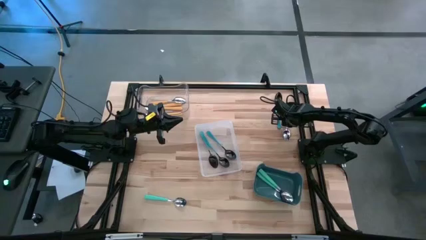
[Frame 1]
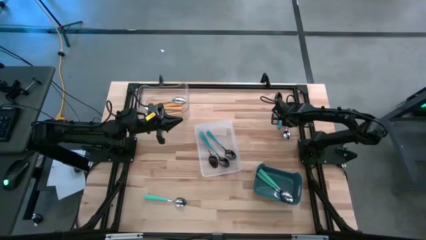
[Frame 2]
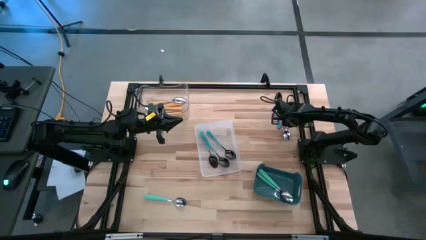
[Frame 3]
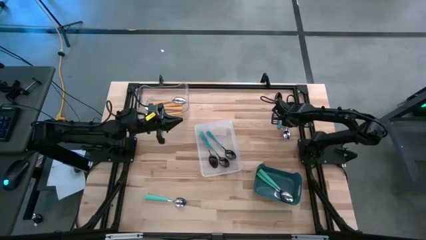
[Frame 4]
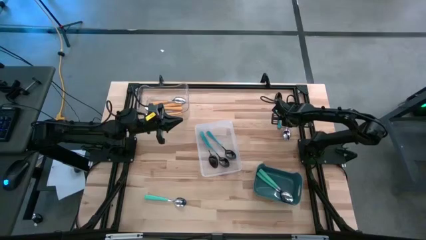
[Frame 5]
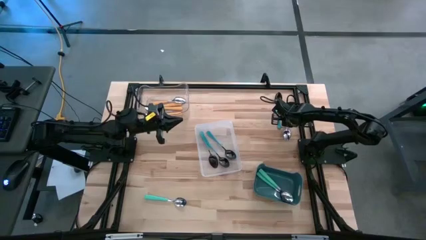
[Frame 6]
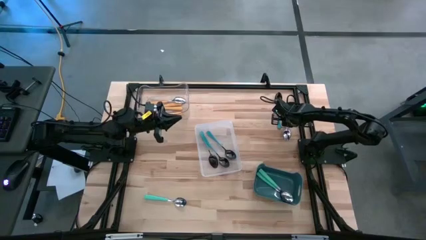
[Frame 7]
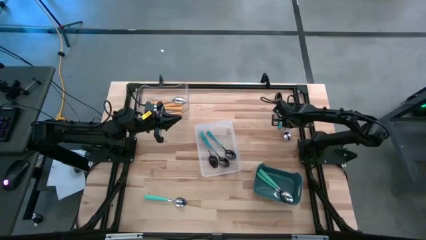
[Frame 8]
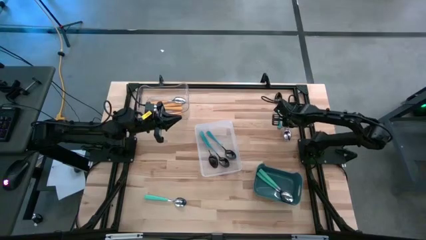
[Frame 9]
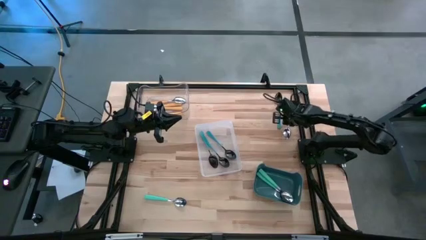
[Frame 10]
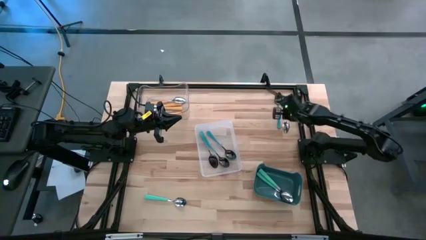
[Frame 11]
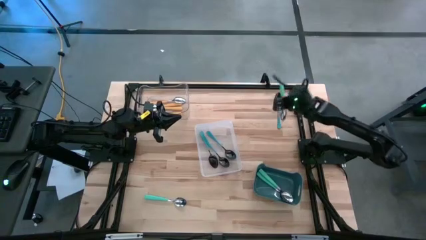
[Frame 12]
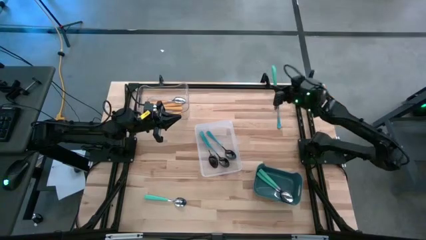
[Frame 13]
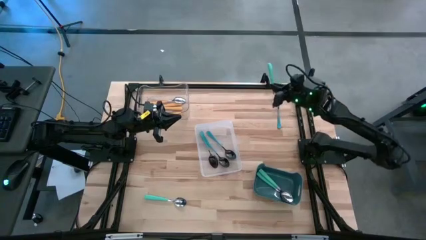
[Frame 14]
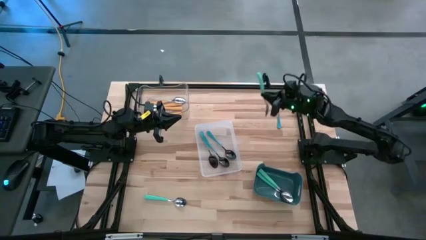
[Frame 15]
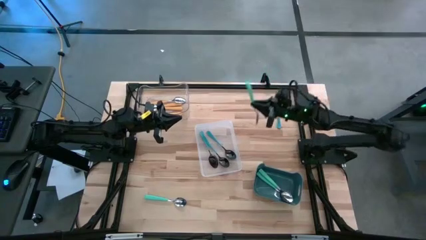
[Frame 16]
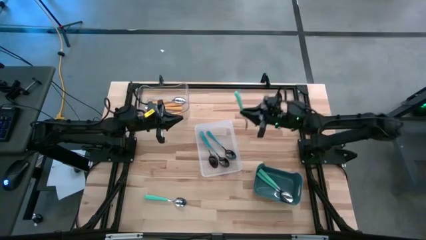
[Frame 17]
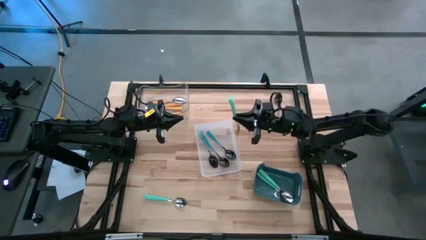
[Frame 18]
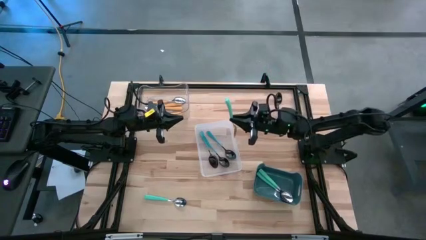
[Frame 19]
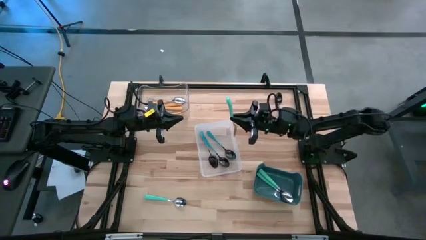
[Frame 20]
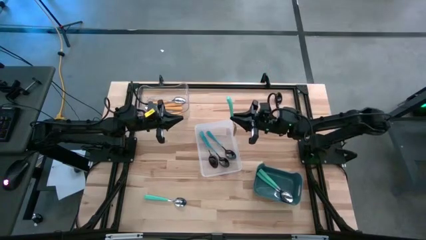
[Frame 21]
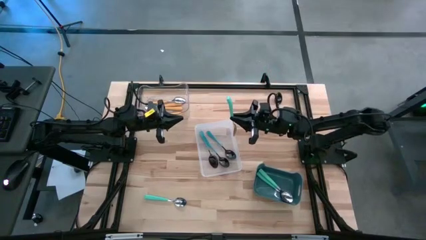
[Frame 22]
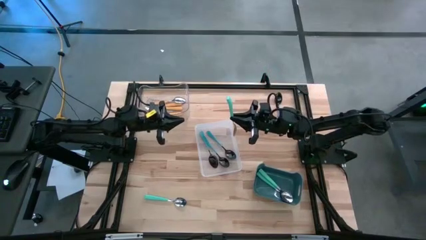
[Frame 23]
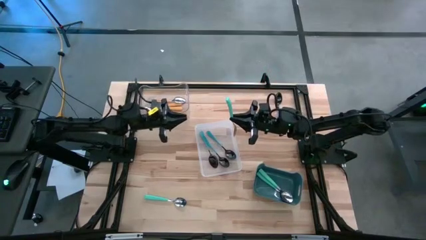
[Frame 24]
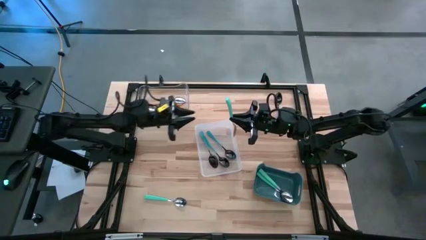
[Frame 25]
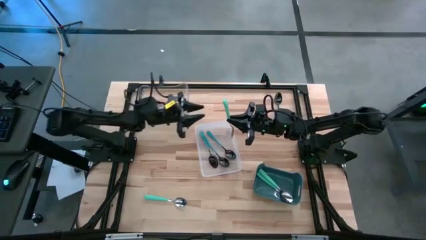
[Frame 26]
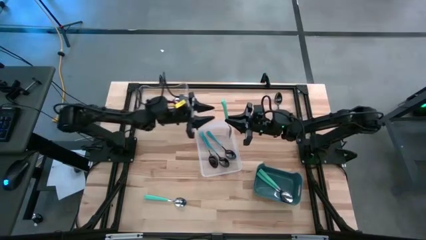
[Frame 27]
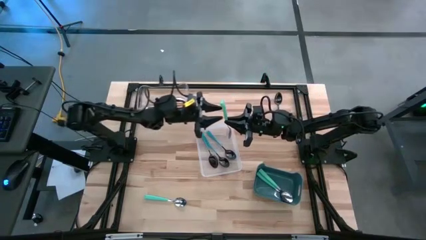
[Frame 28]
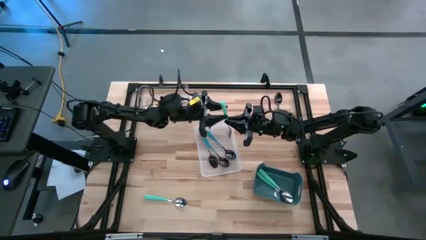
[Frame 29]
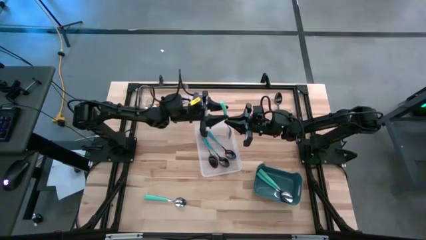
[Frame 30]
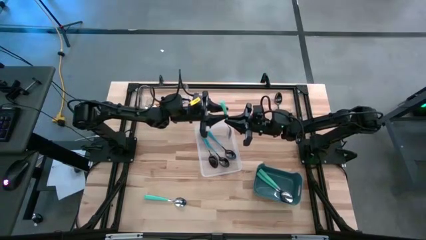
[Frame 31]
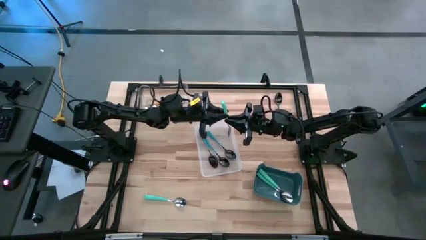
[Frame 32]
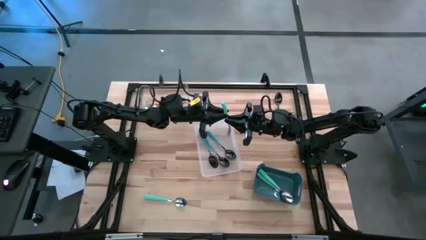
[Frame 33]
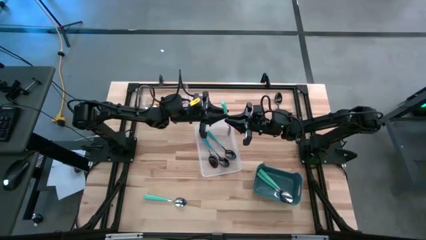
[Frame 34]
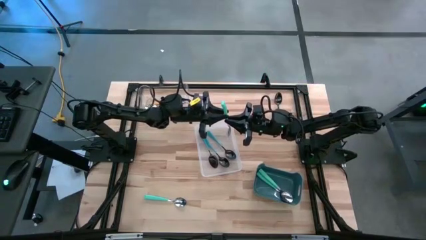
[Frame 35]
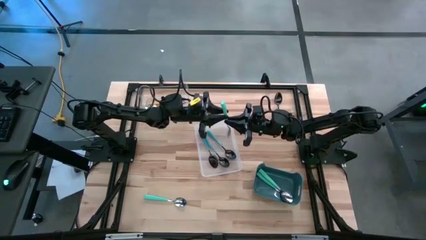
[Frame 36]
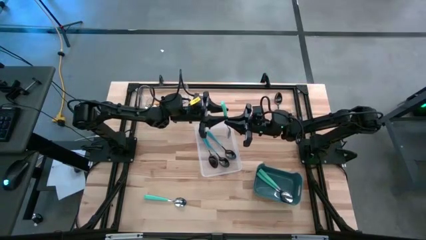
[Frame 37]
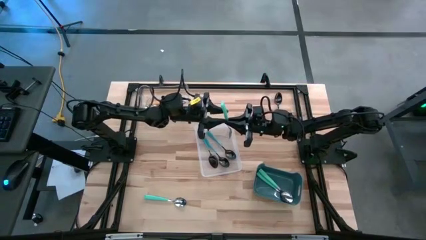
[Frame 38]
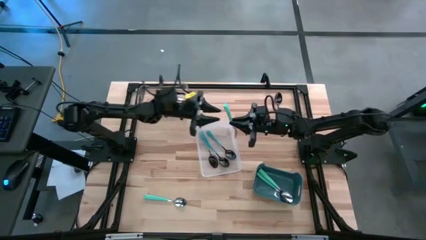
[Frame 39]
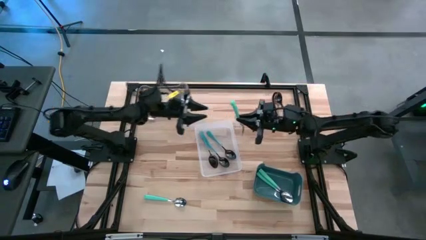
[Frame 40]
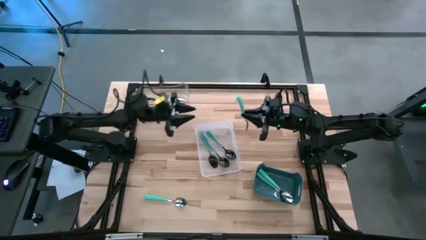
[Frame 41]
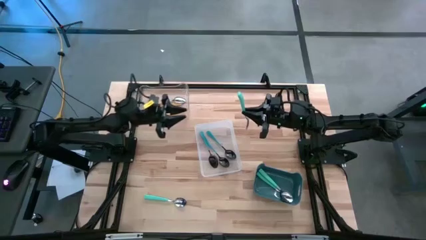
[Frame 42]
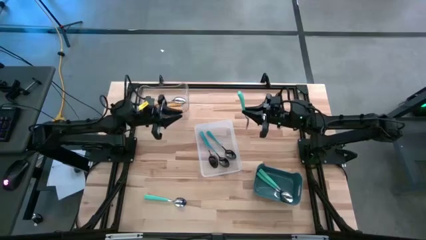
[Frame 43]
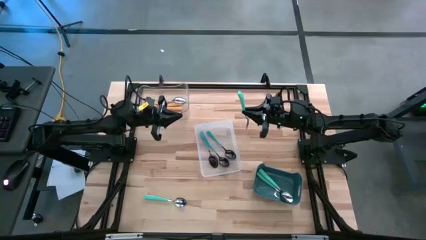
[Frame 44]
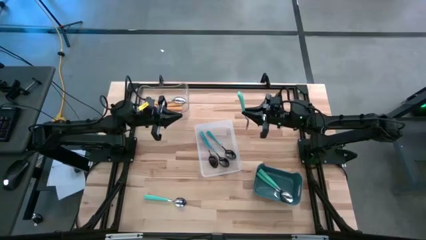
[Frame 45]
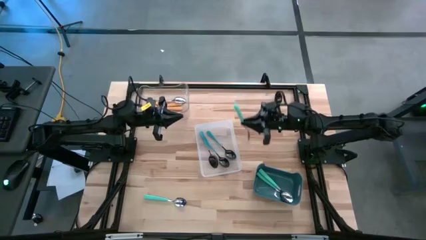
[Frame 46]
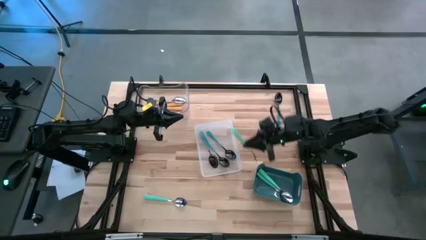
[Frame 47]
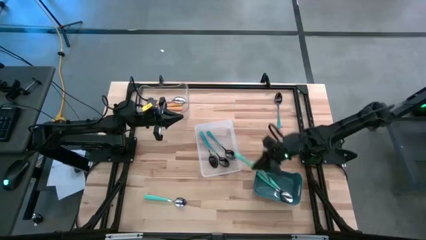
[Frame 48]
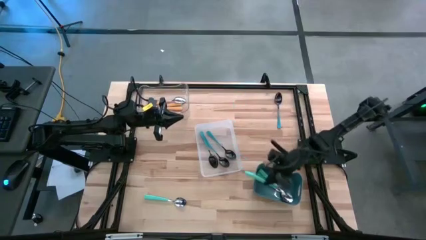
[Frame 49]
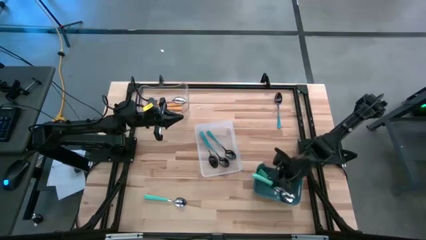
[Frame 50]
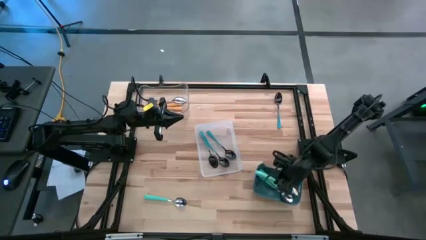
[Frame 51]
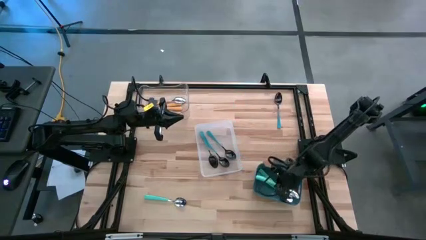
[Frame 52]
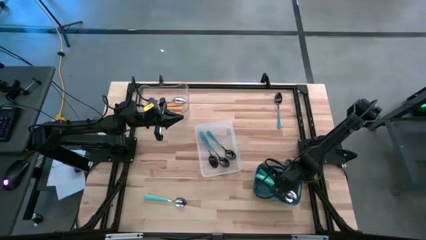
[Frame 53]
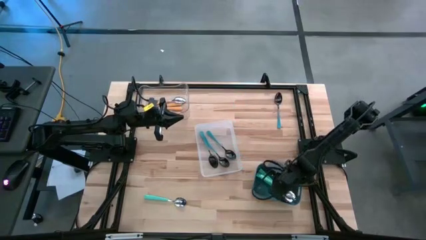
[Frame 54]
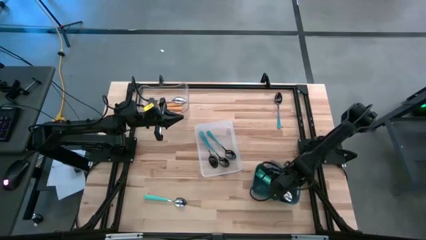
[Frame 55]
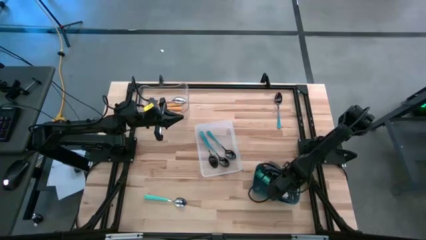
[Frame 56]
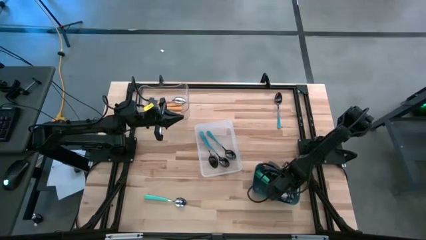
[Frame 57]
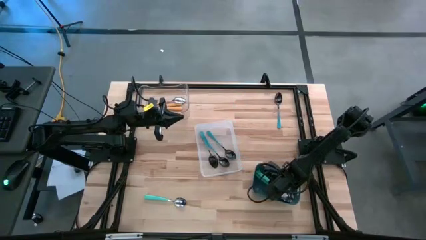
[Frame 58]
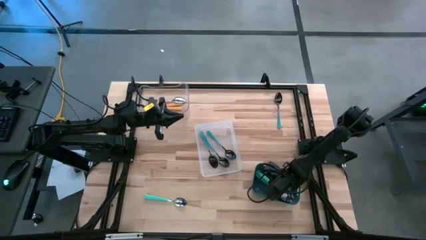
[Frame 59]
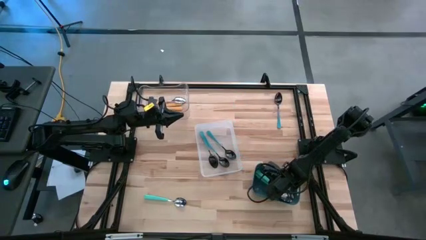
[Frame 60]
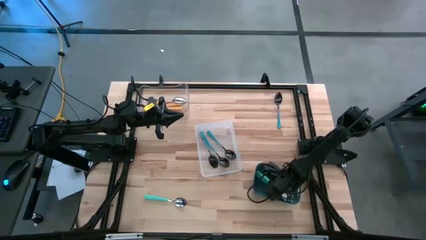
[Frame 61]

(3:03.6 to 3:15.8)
Task: Sort silverware by color (type)
Put the light blue spoon into the blue bin
